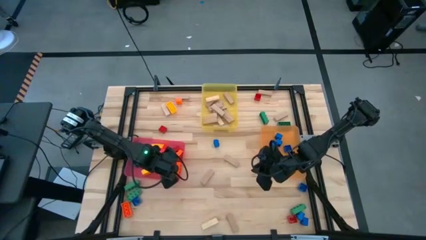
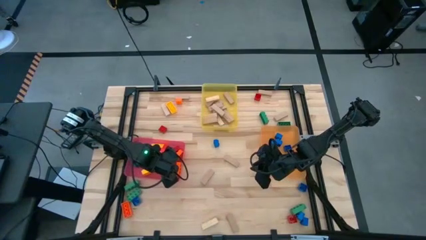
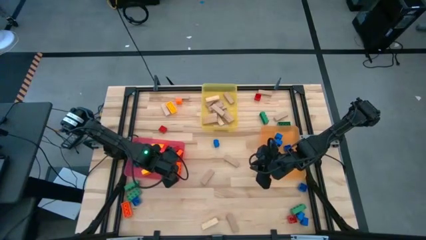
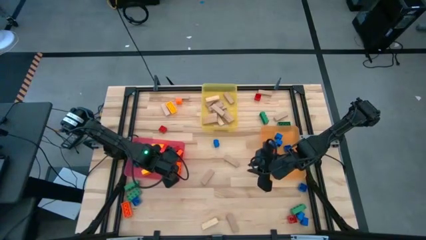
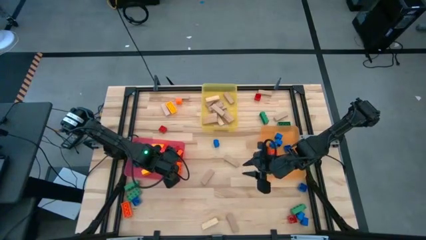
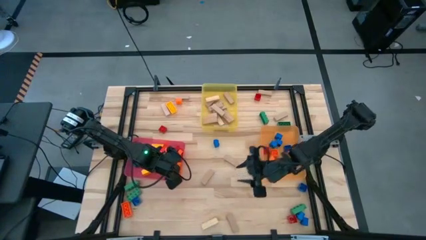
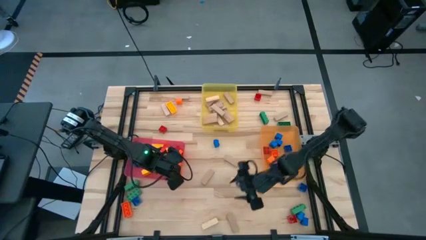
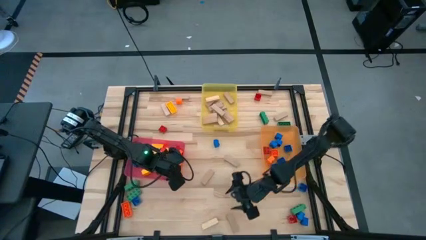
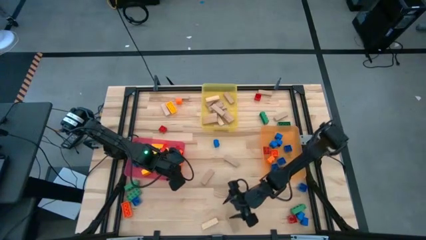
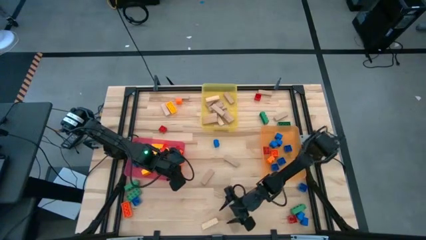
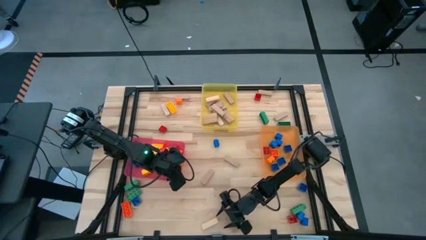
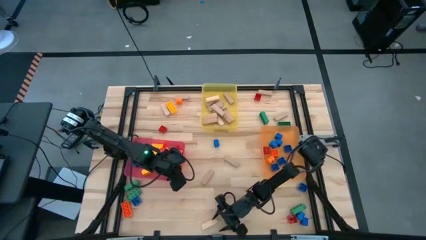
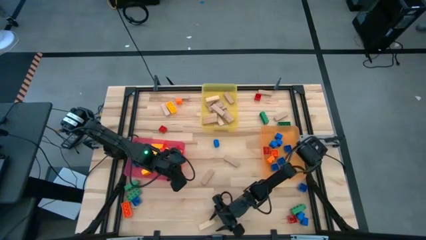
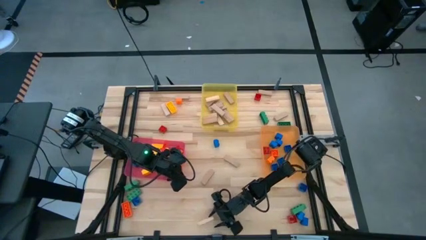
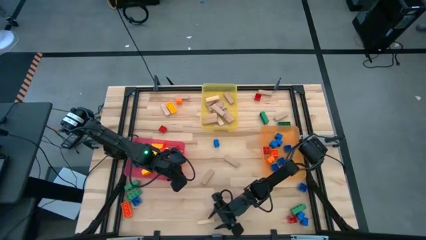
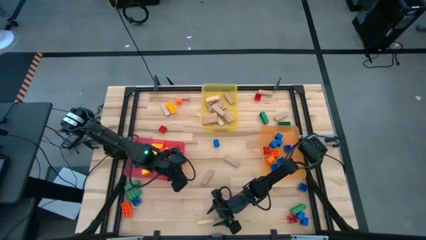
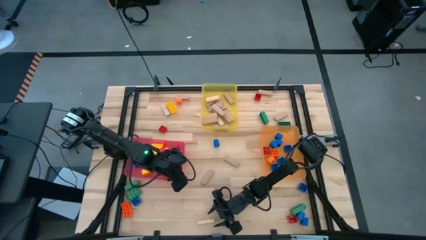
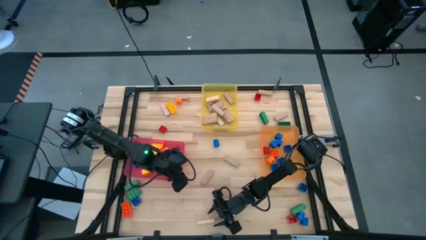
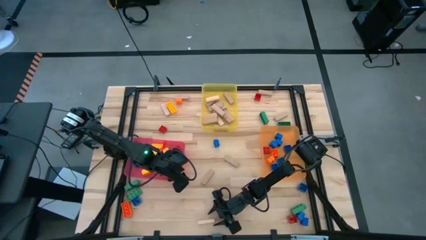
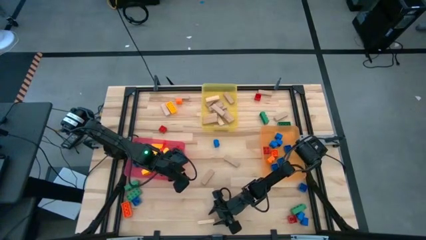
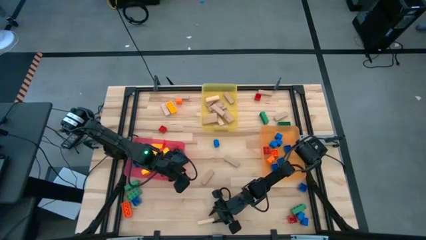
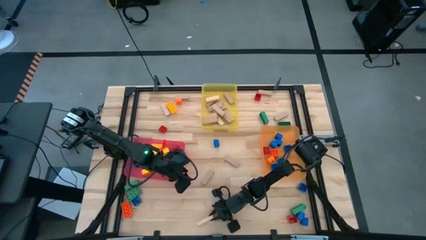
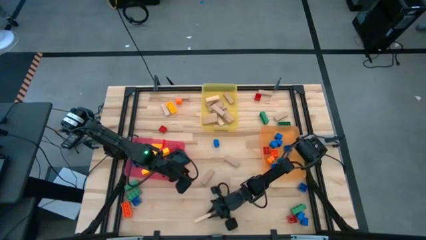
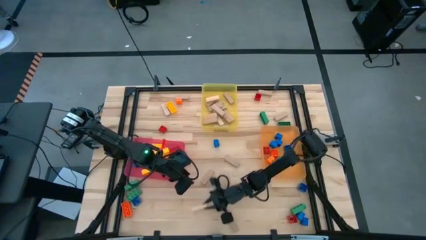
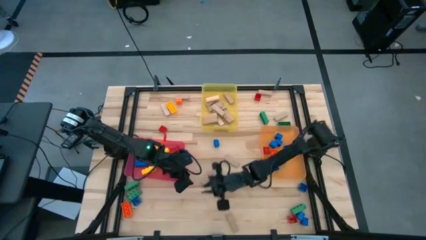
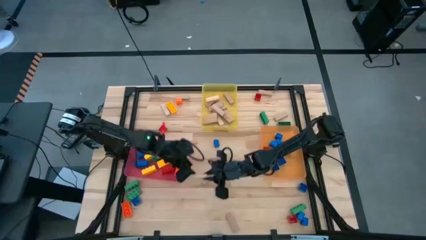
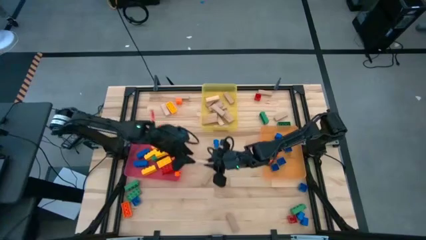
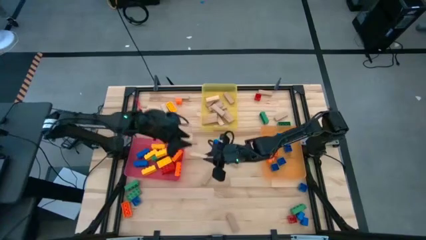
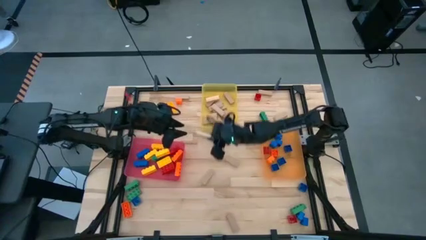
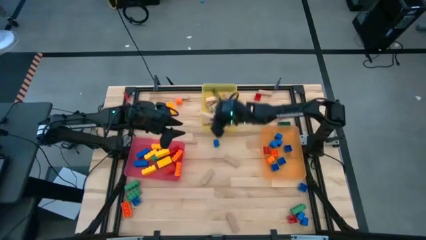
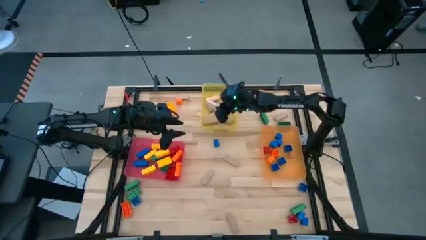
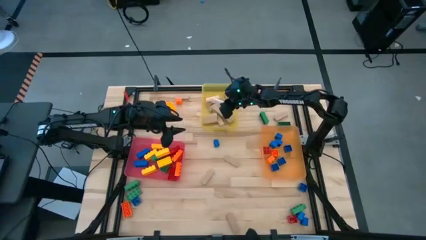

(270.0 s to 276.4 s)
Task: Sort blocks by size
Put the wooden block into the yellow bin

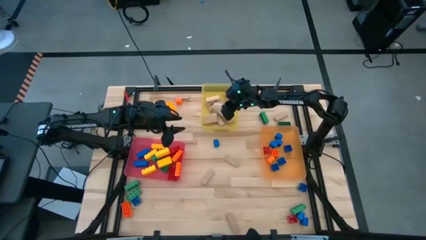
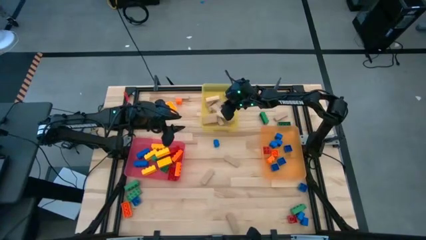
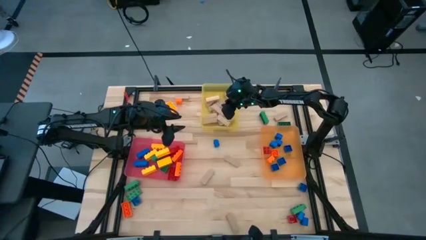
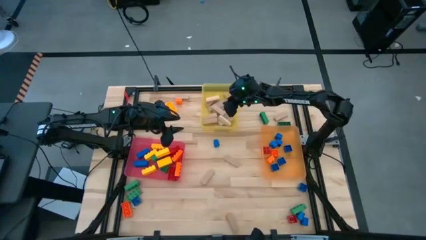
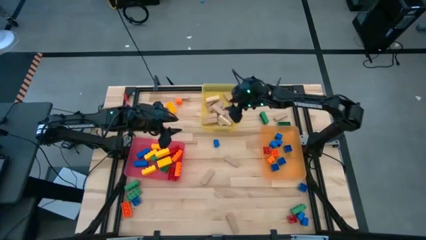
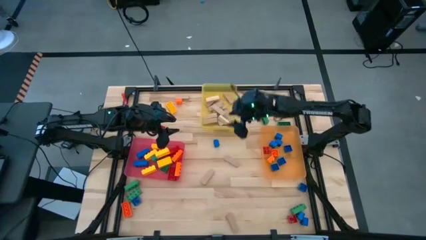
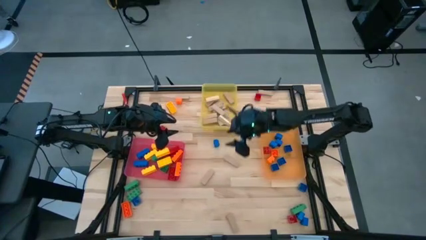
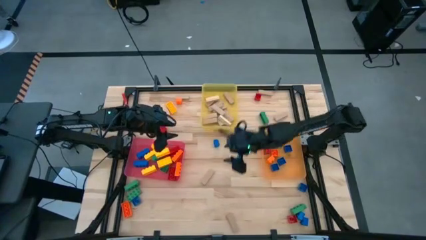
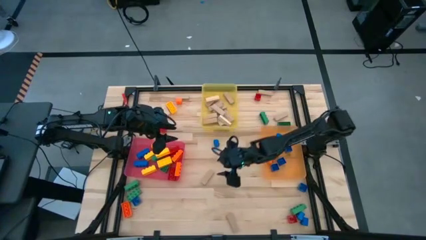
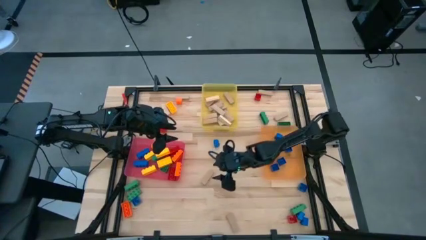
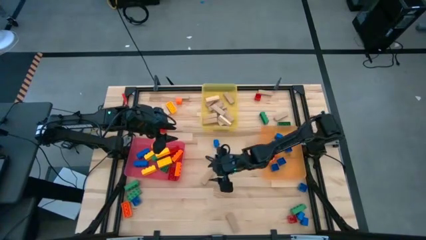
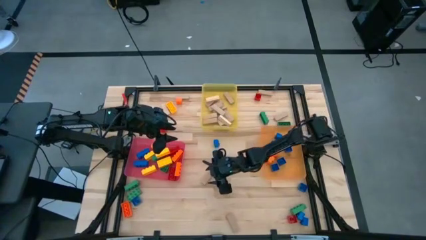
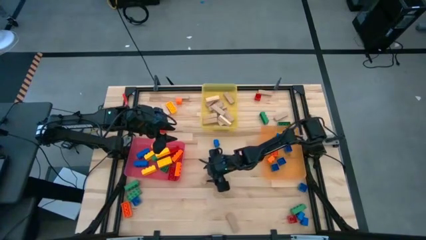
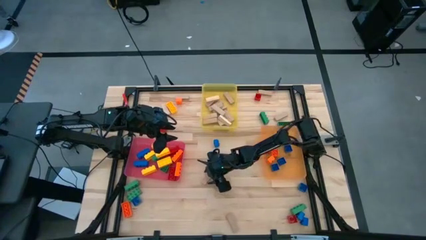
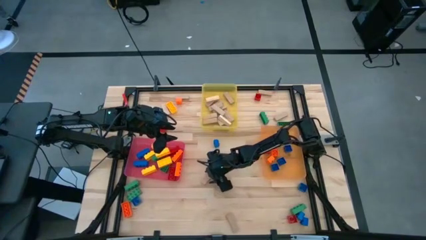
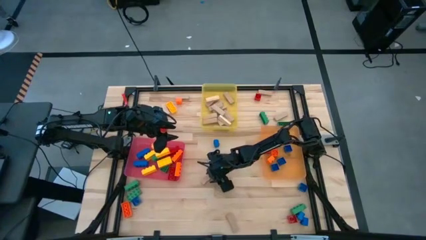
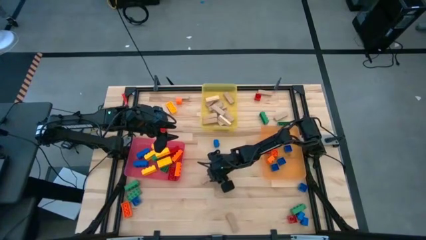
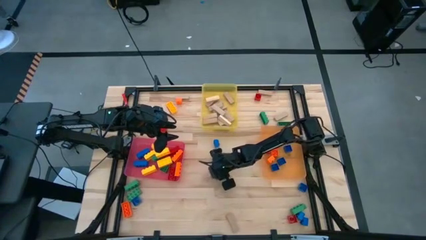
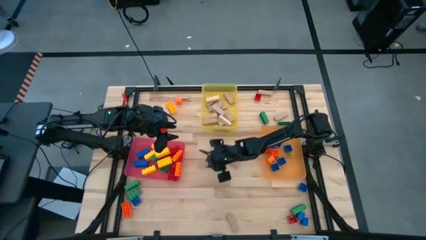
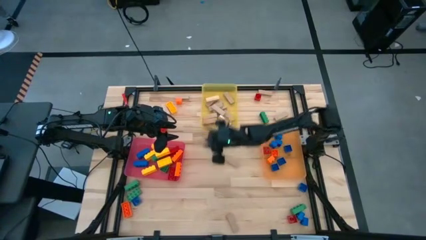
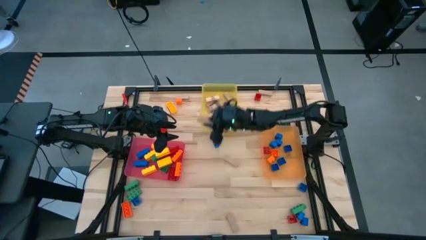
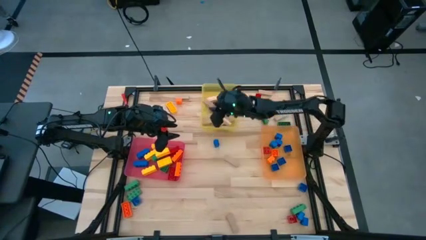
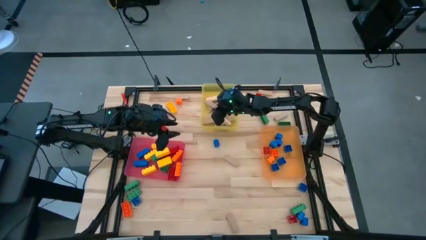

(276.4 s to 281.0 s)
Put the wooden block into the yellow bin

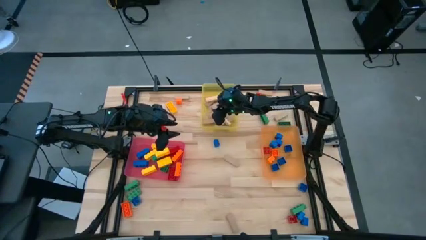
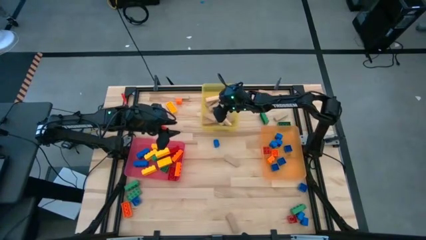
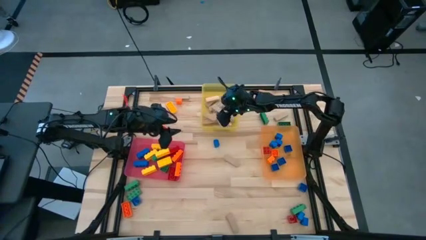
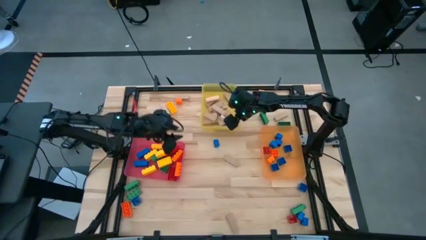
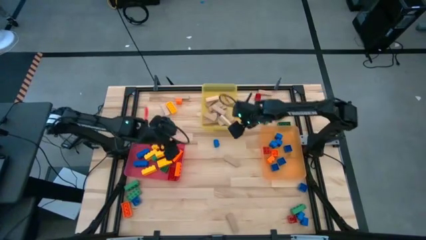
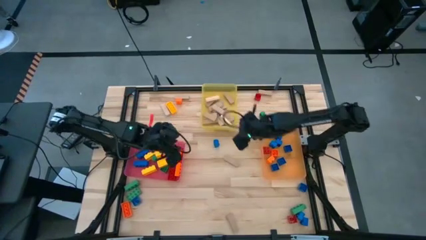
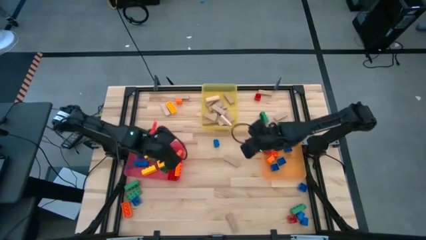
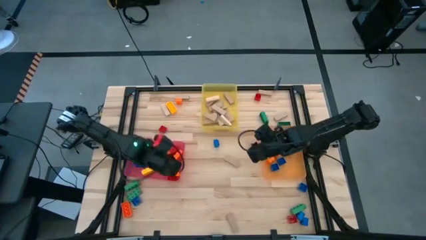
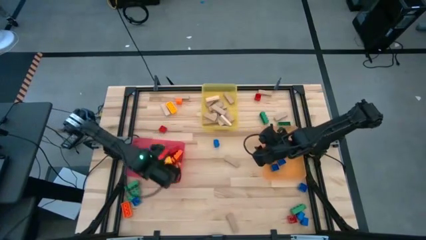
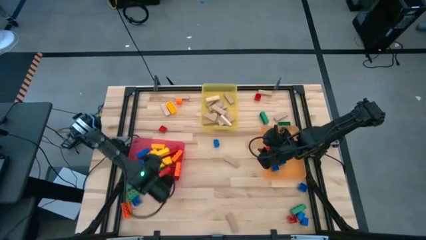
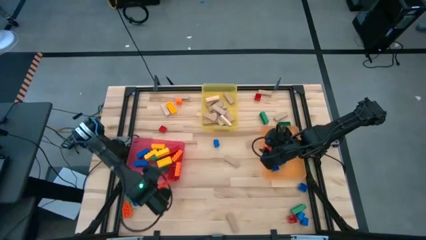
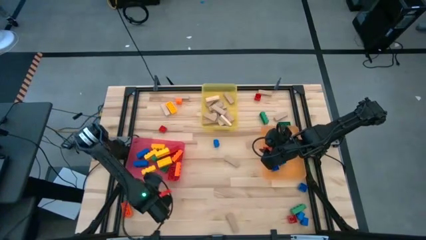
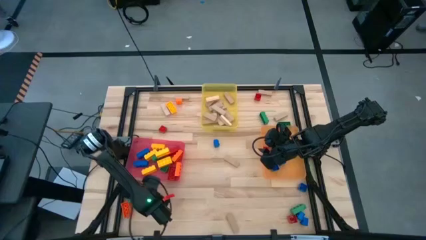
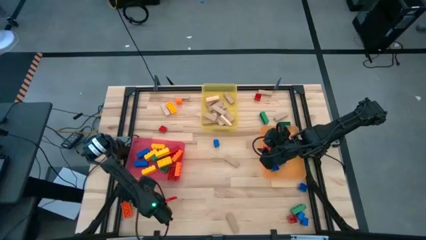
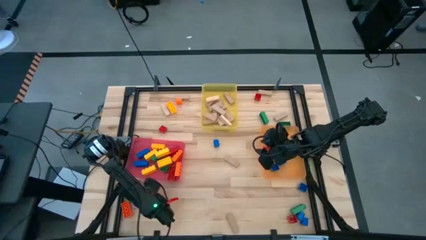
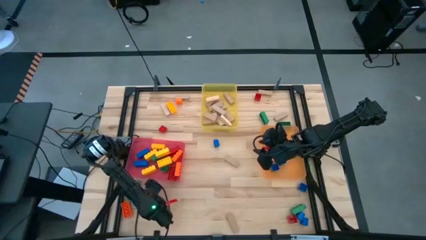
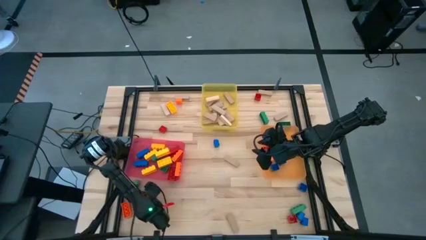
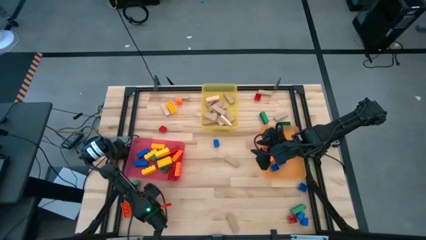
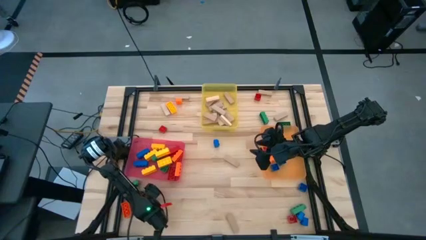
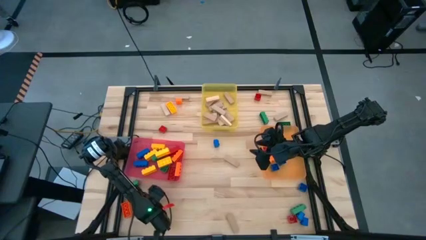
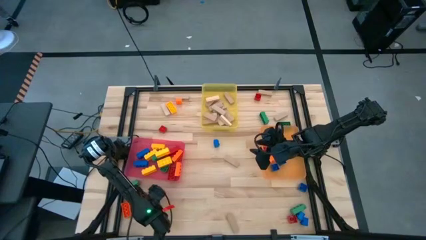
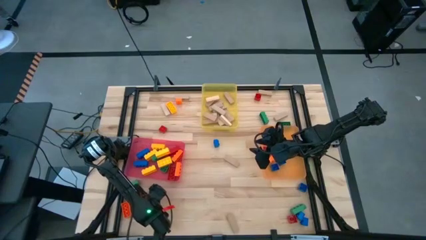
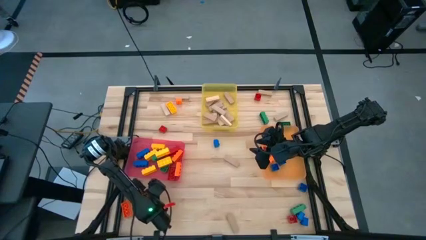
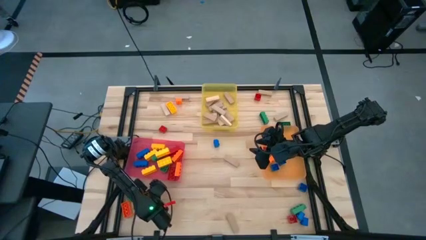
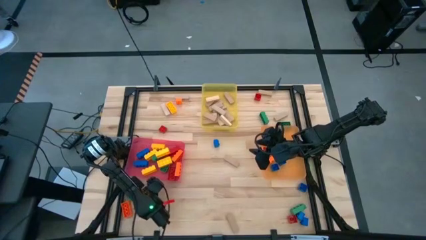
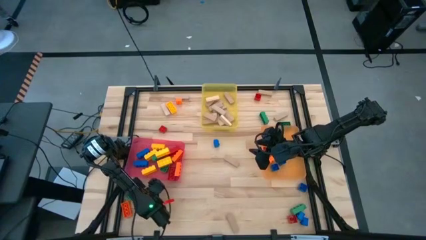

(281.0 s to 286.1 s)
Put the 1 stud blue game piece into the orange bin
